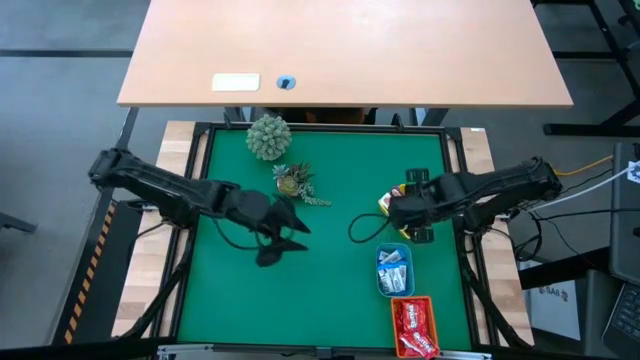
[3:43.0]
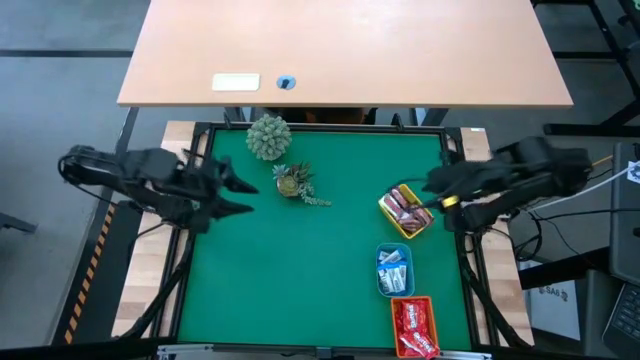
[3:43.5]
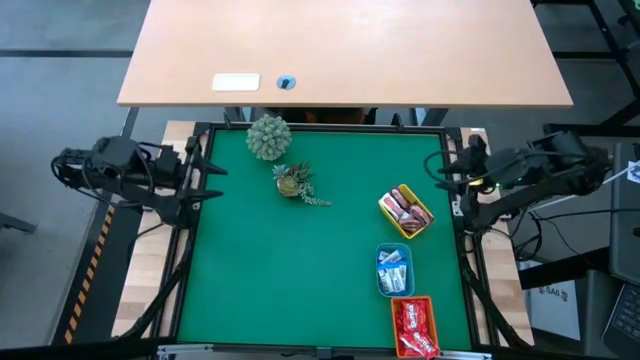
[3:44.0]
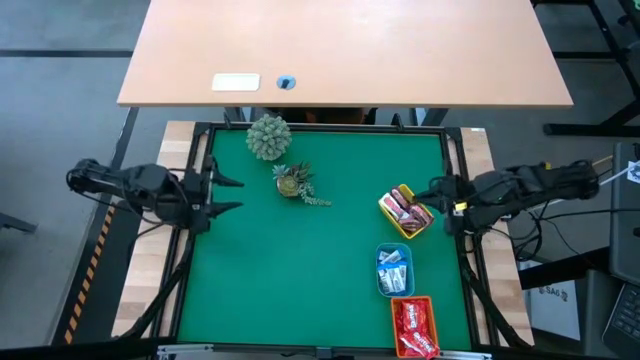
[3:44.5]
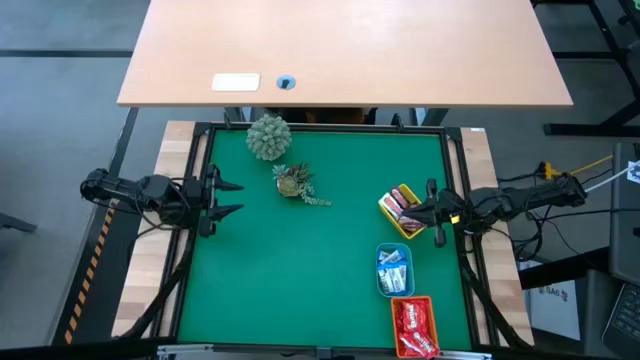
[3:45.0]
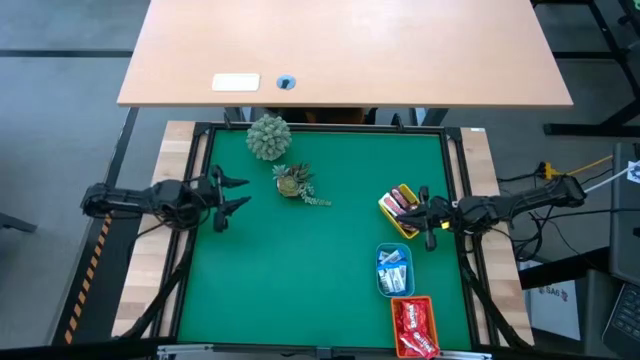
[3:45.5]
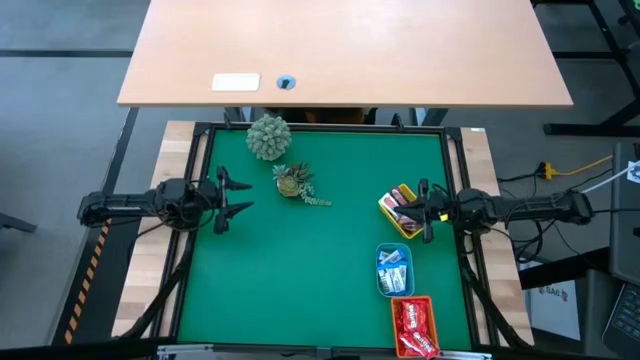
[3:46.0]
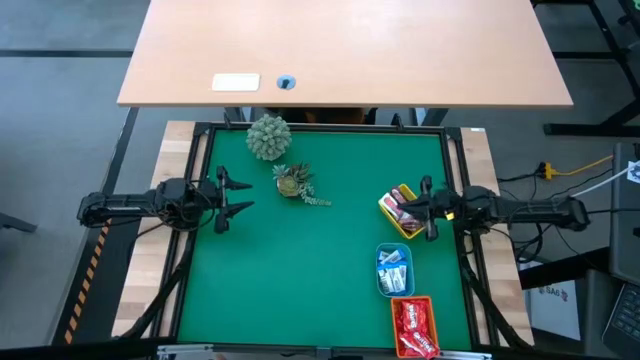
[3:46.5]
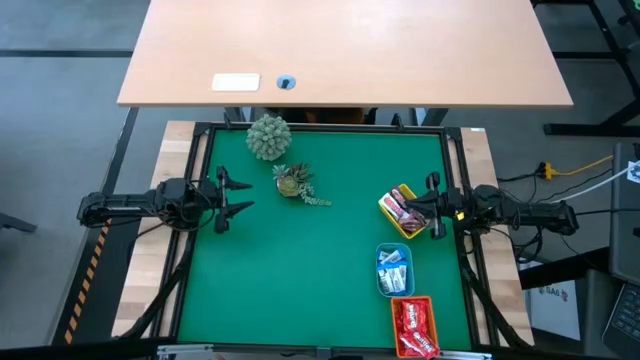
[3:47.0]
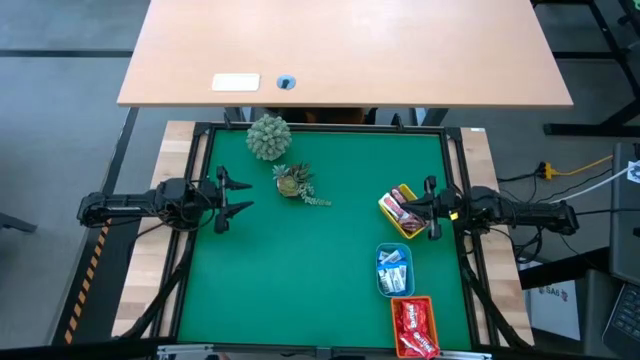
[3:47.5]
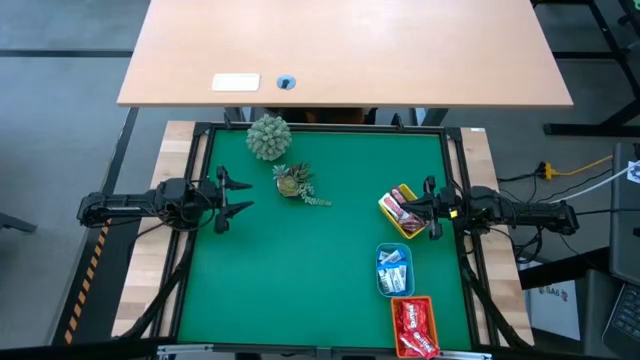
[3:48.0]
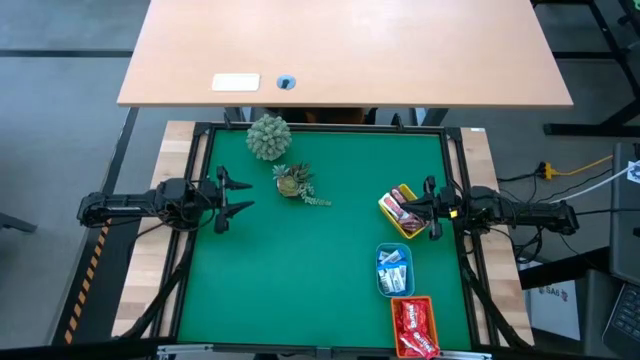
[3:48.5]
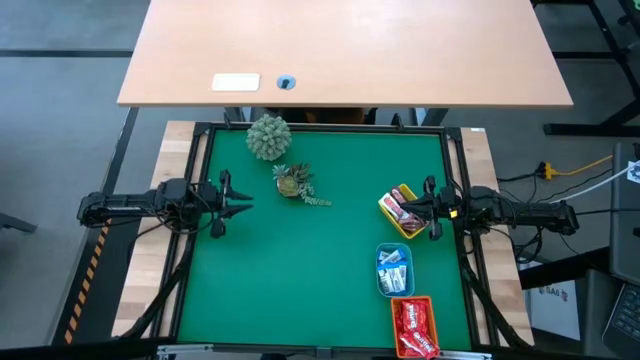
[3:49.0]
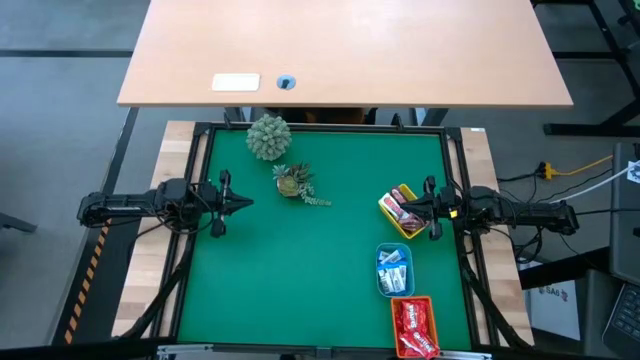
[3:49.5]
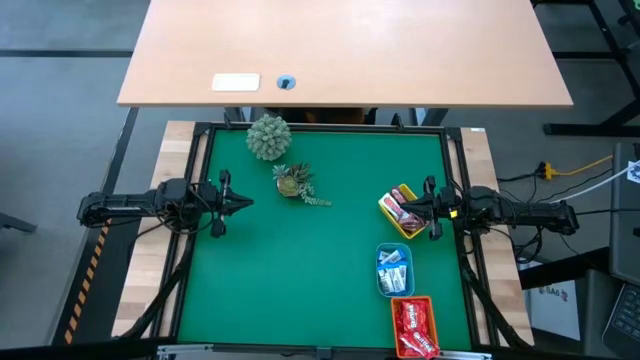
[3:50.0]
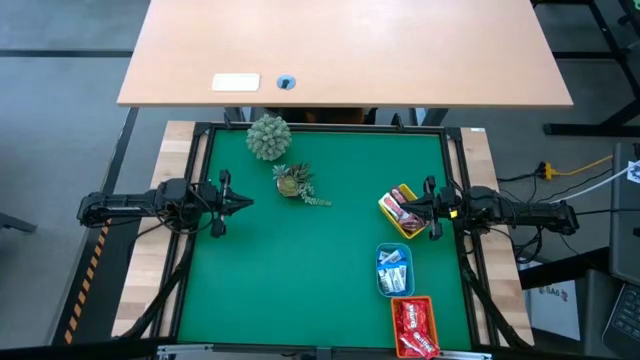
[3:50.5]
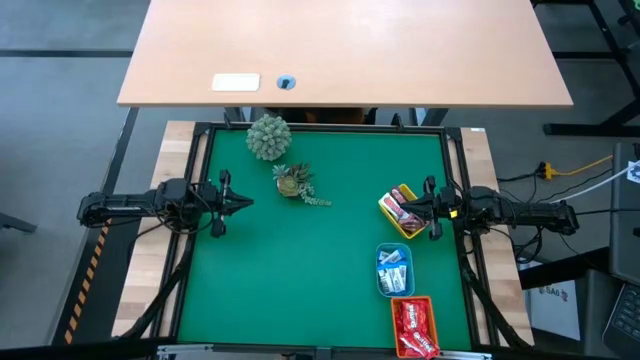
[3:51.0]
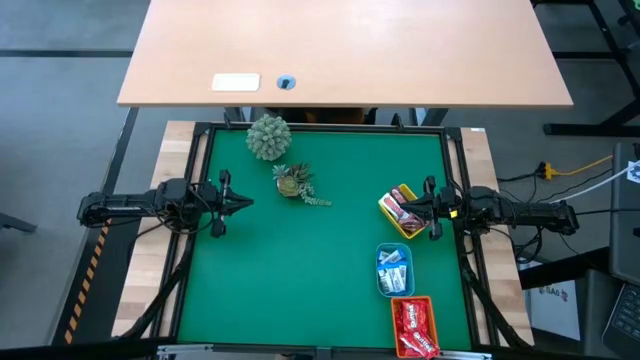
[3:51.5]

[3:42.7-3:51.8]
Task: Sort candy
Return to Home Position

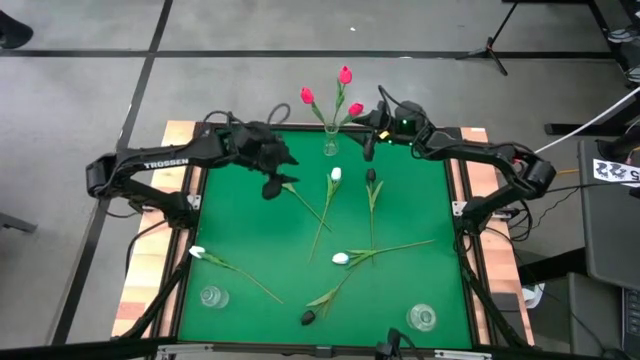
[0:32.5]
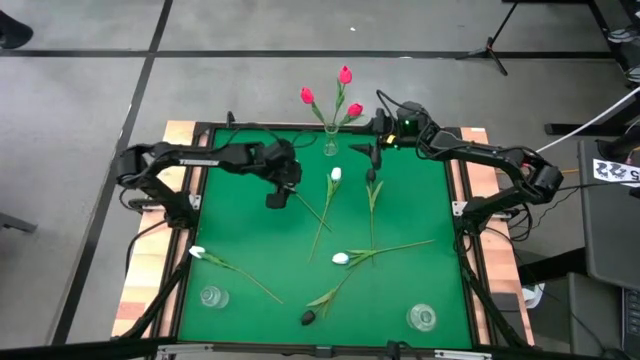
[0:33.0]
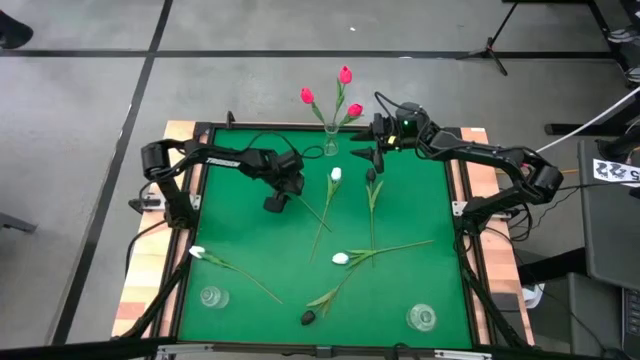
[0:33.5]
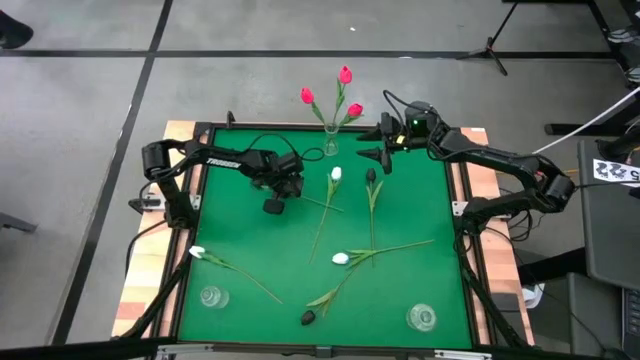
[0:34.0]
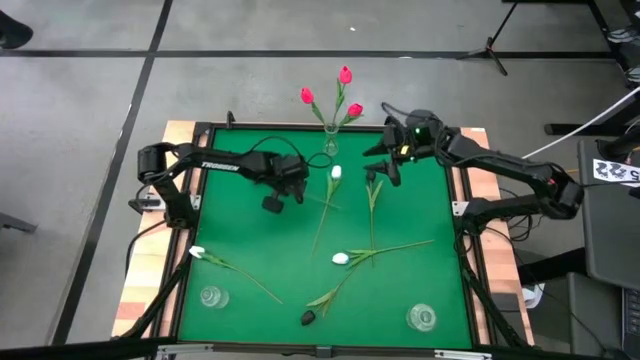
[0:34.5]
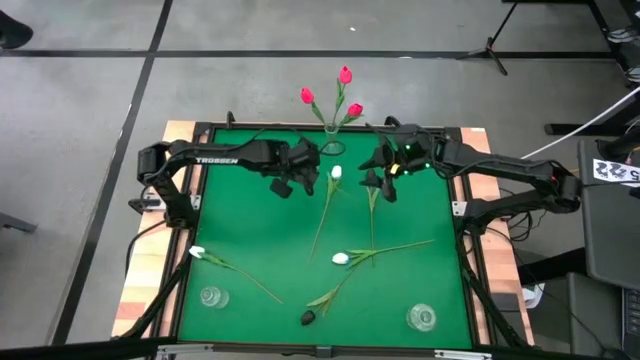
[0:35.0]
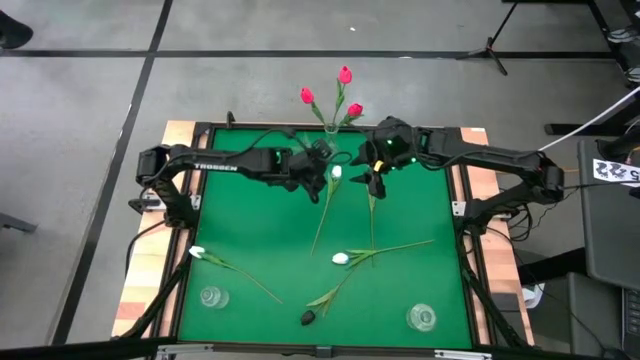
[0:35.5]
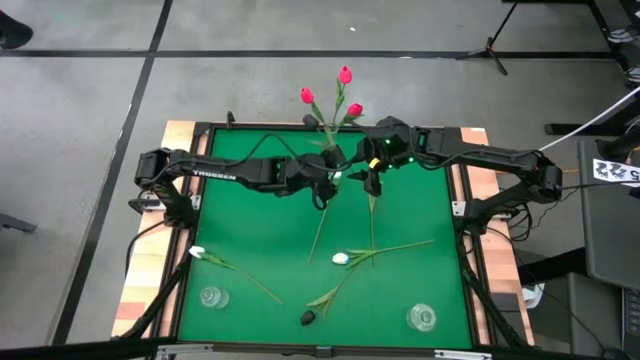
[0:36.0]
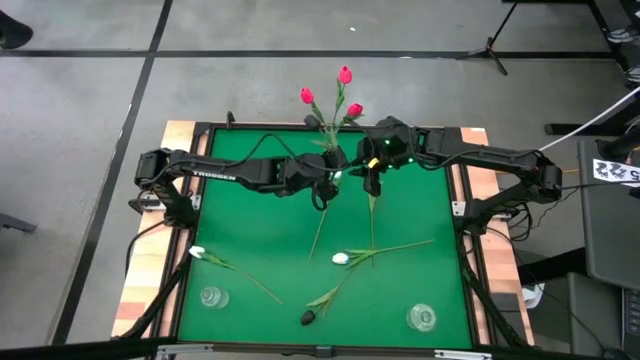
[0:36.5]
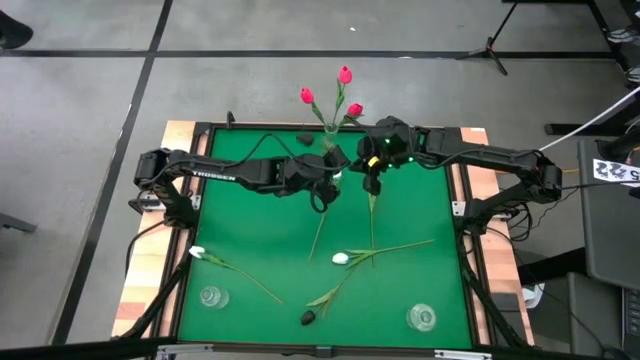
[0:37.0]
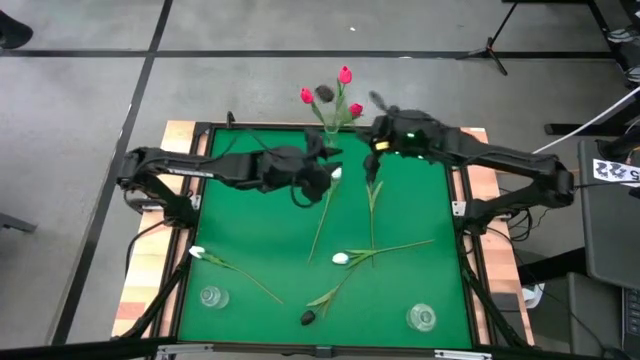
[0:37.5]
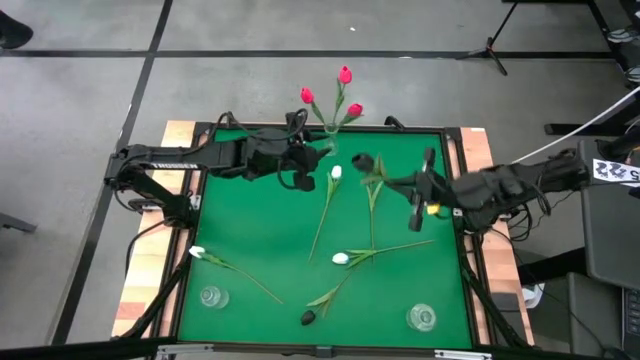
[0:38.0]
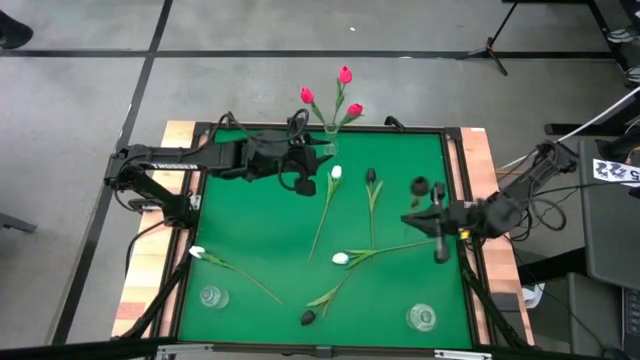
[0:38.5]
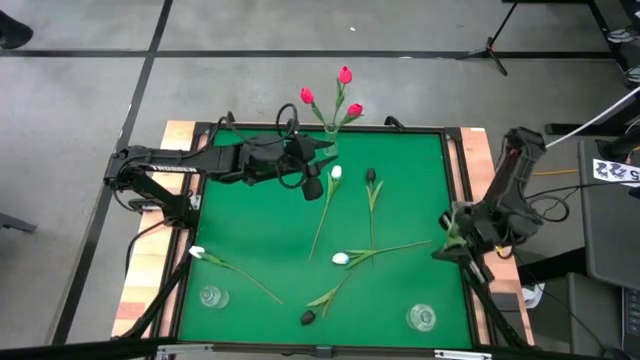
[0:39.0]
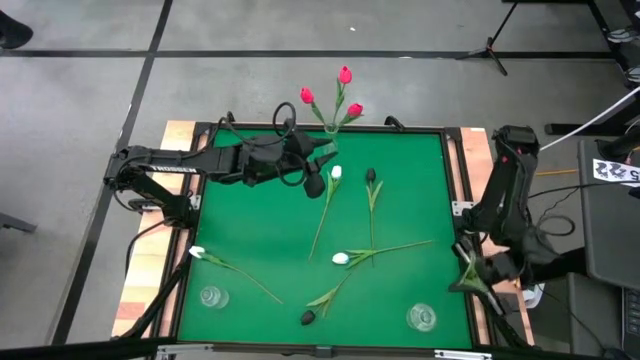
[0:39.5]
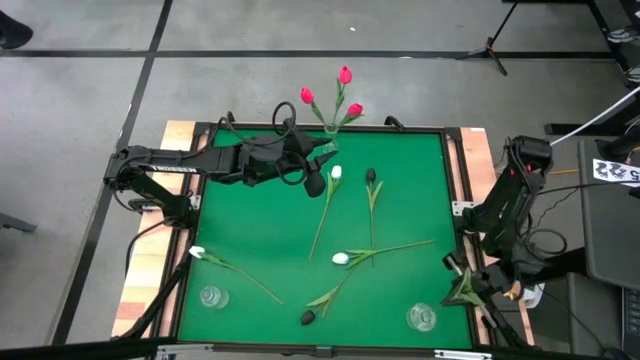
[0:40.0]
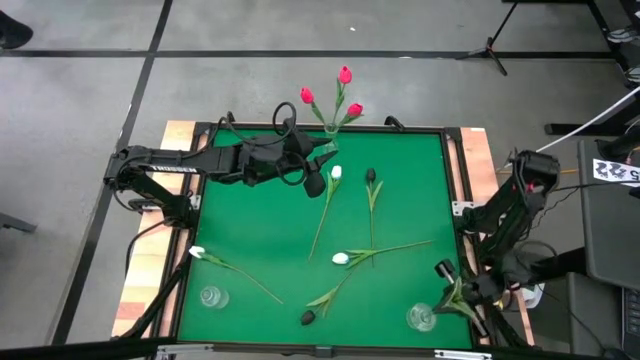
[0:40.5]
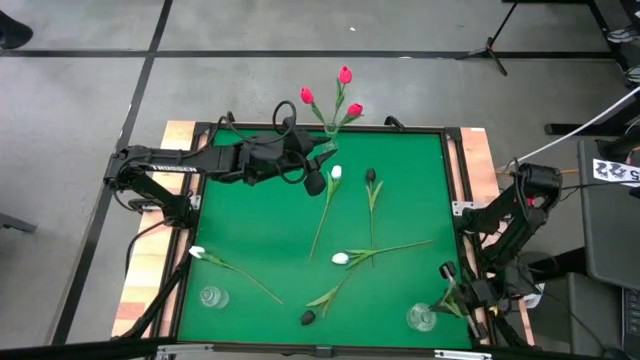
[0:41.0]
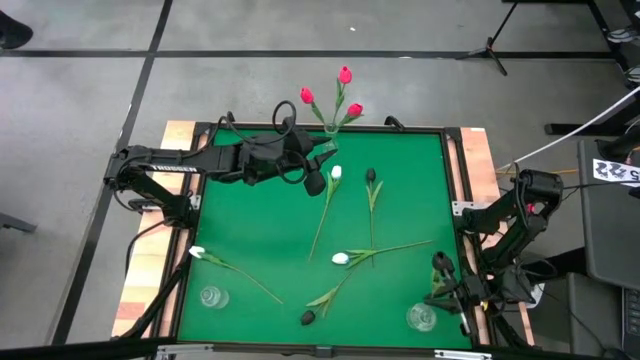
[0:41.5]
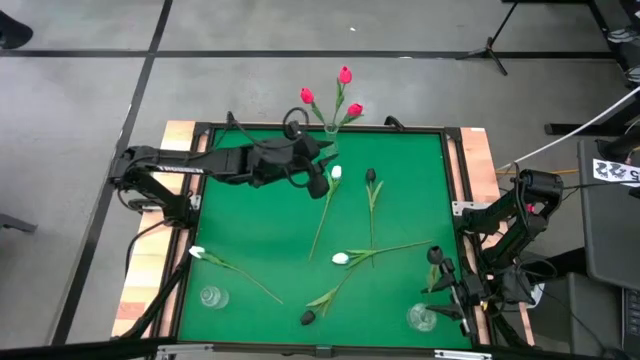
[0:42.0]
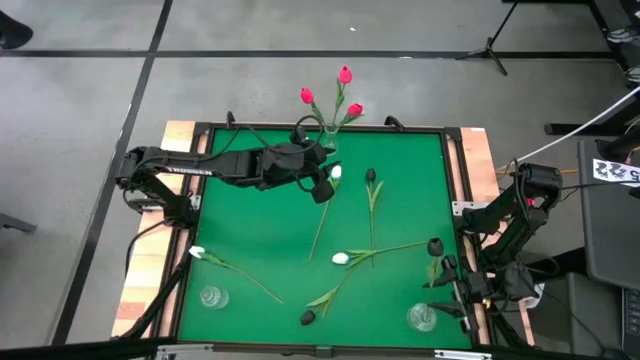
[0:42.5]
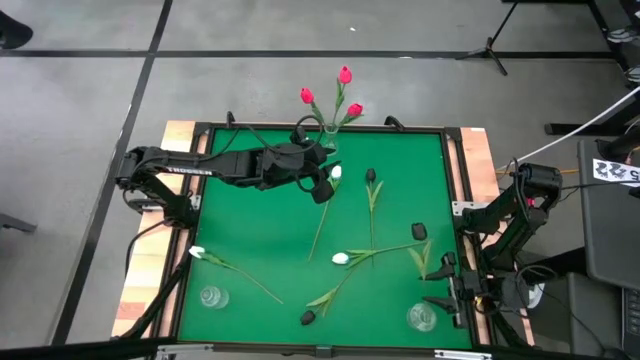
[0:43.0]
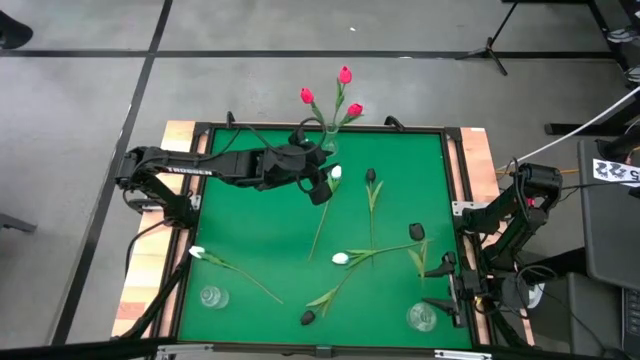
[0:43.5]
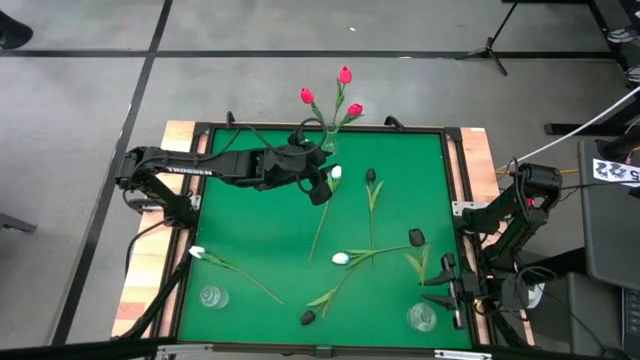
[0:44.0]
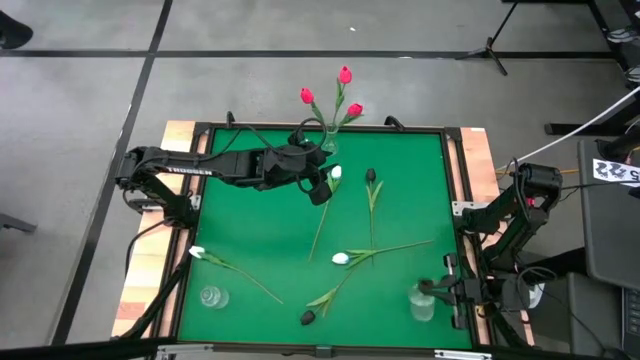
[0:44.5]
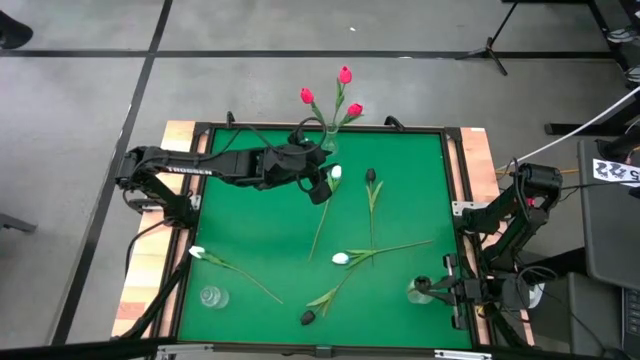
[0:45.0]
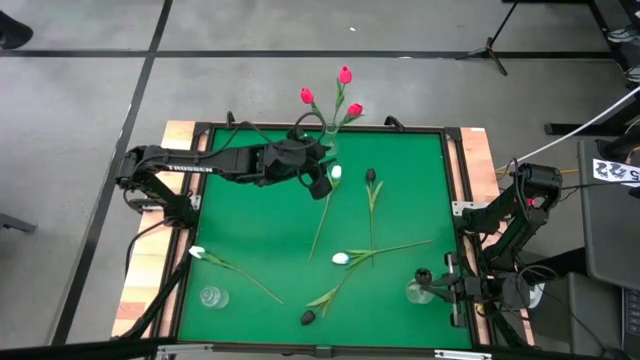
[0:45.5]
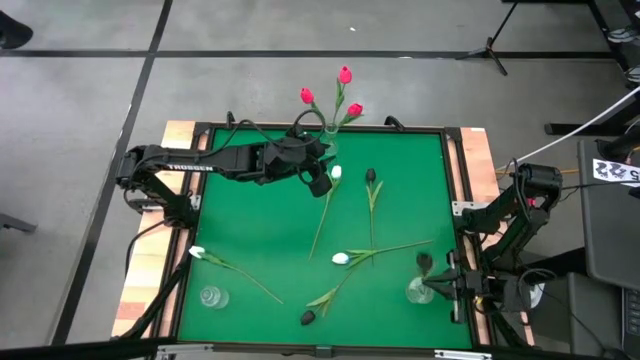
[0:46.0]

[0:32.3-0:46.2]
Task: Sort flowers into vase by color
Put the top left black tulip into the bottom right transparent vase
